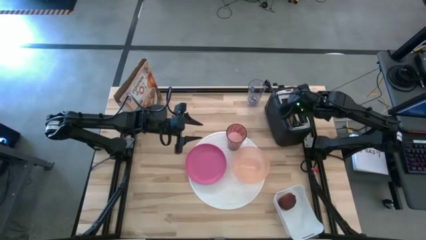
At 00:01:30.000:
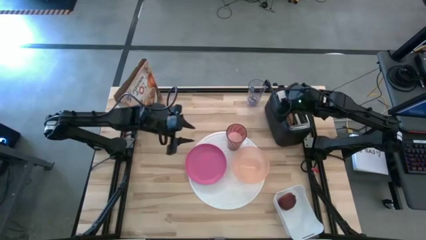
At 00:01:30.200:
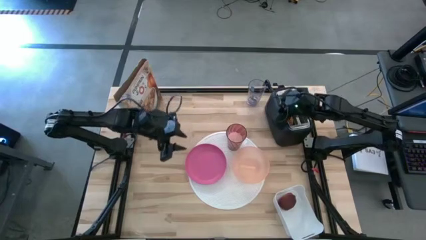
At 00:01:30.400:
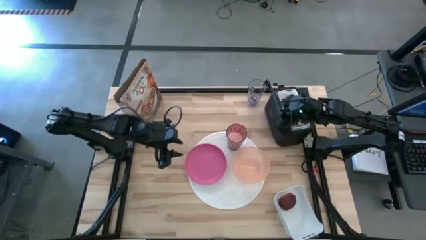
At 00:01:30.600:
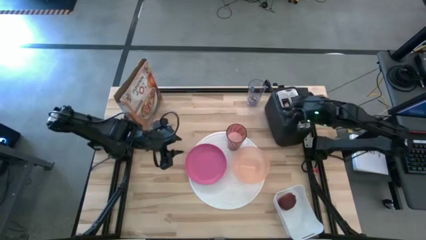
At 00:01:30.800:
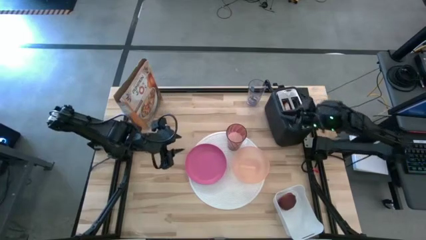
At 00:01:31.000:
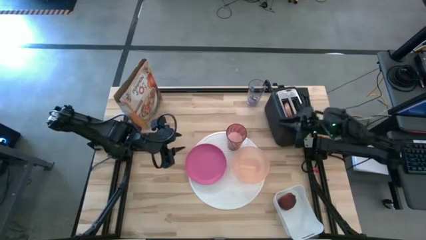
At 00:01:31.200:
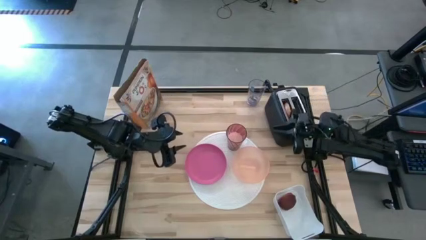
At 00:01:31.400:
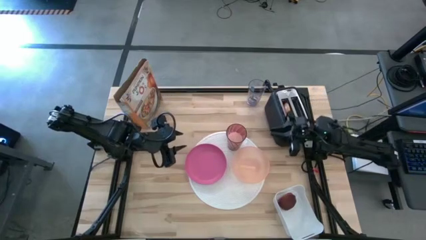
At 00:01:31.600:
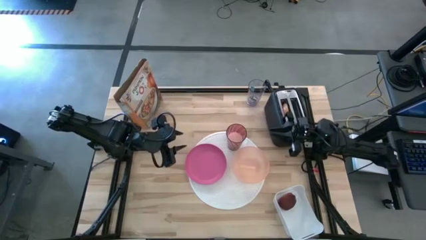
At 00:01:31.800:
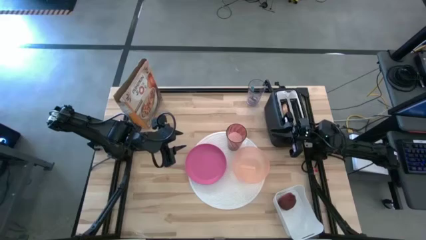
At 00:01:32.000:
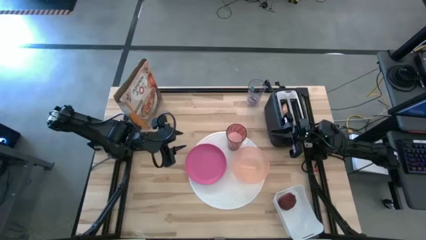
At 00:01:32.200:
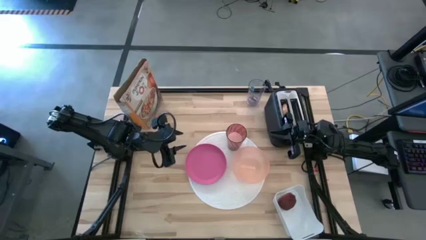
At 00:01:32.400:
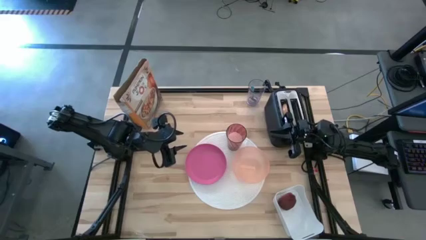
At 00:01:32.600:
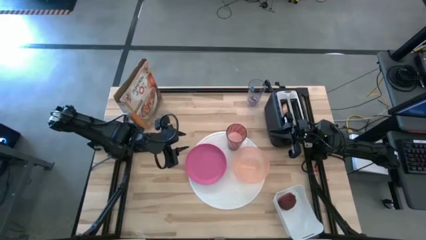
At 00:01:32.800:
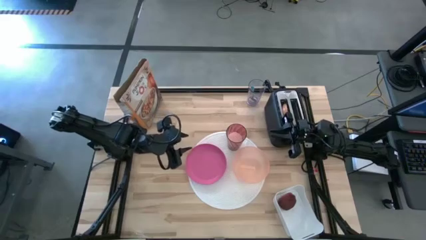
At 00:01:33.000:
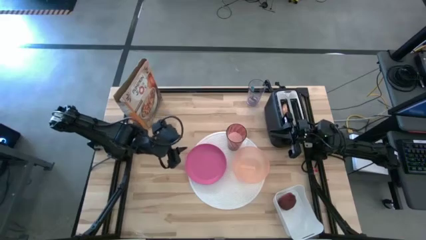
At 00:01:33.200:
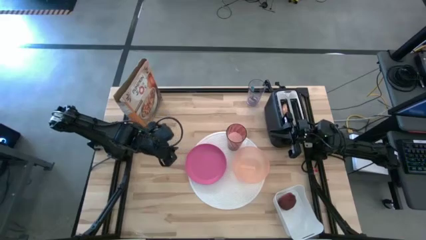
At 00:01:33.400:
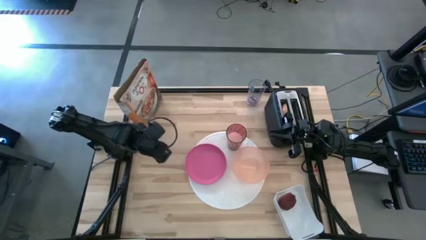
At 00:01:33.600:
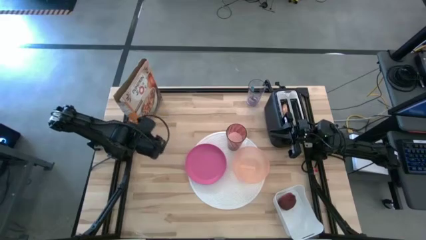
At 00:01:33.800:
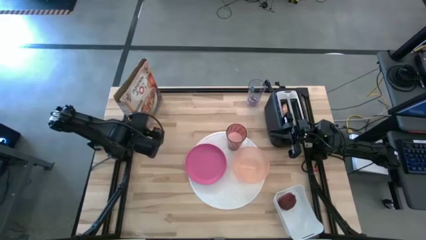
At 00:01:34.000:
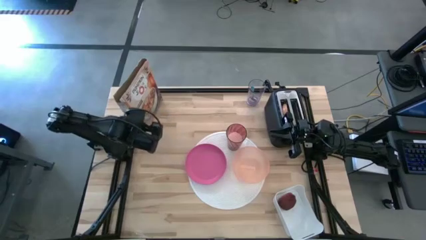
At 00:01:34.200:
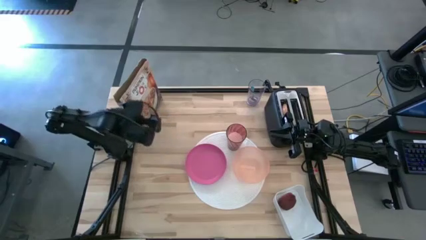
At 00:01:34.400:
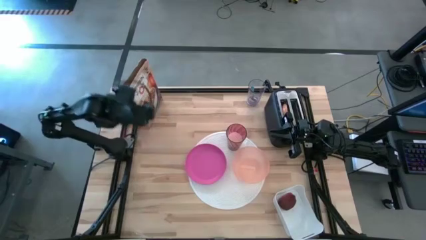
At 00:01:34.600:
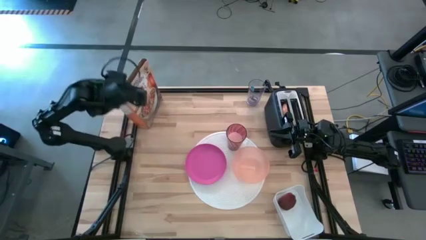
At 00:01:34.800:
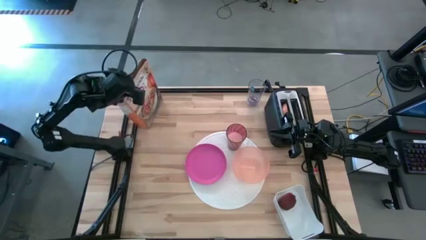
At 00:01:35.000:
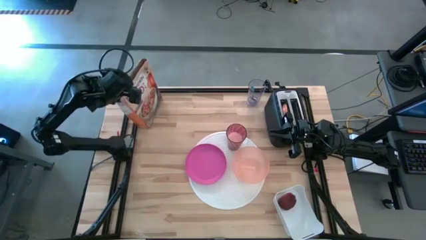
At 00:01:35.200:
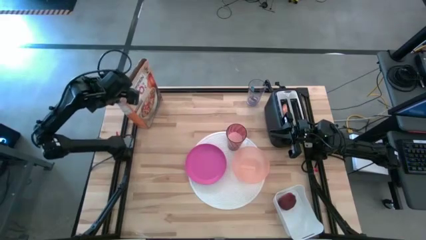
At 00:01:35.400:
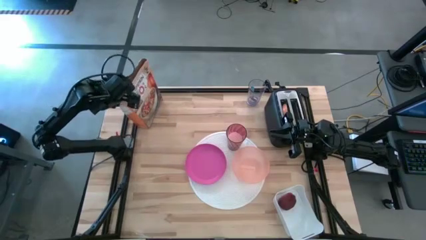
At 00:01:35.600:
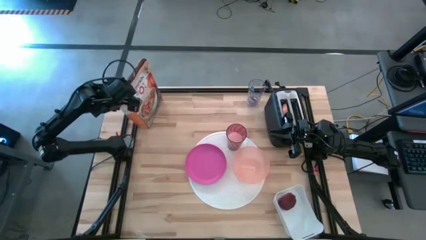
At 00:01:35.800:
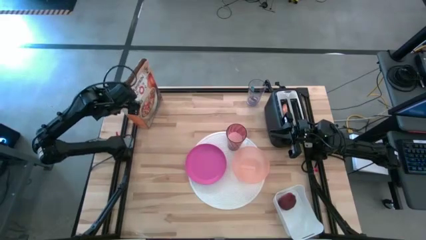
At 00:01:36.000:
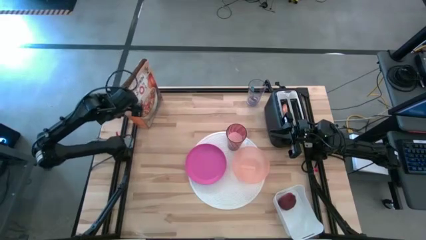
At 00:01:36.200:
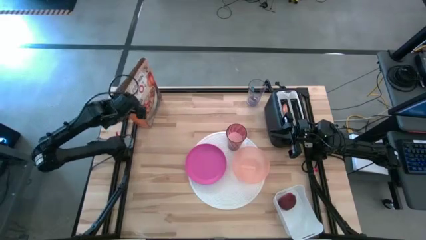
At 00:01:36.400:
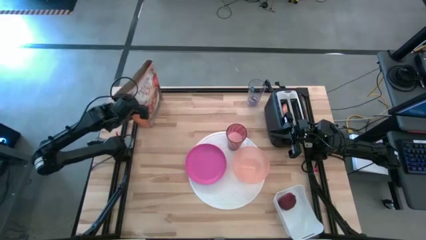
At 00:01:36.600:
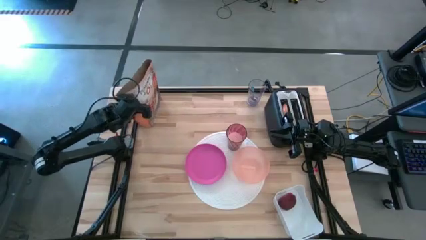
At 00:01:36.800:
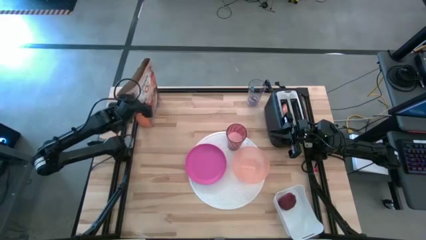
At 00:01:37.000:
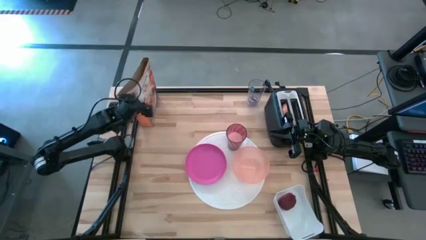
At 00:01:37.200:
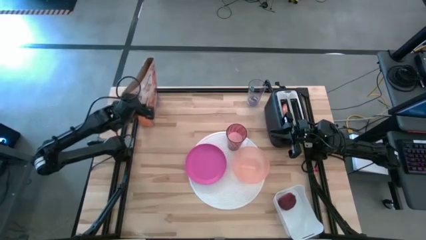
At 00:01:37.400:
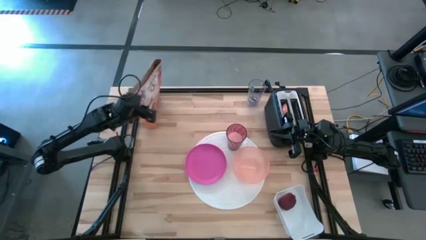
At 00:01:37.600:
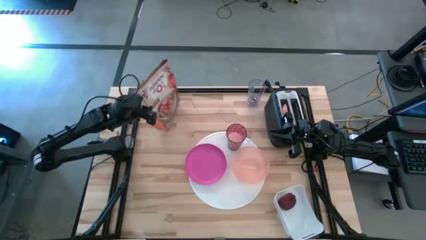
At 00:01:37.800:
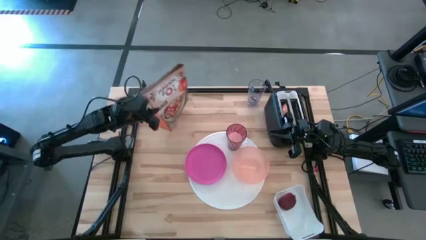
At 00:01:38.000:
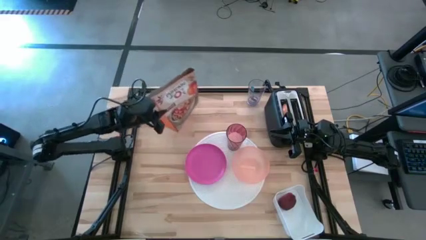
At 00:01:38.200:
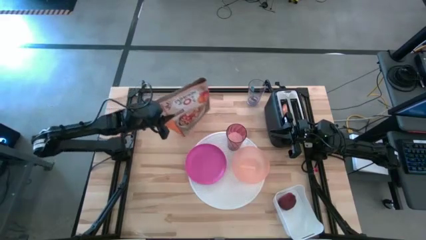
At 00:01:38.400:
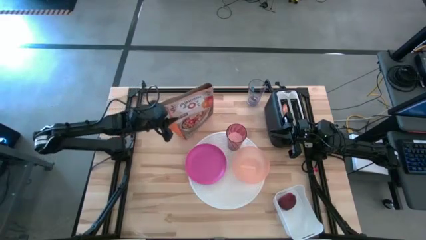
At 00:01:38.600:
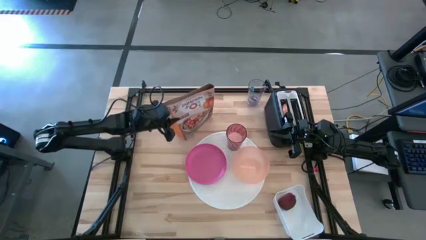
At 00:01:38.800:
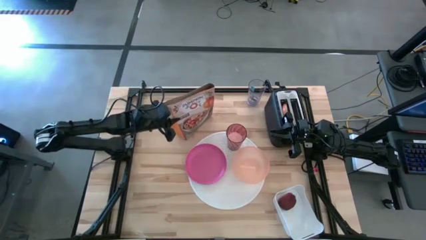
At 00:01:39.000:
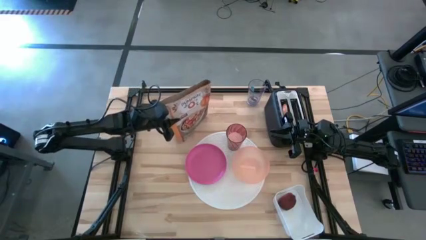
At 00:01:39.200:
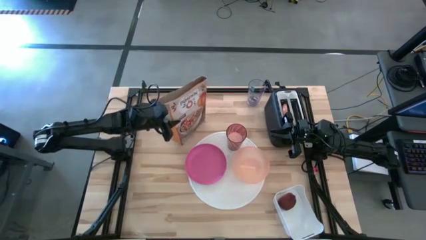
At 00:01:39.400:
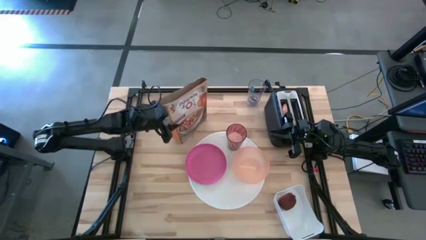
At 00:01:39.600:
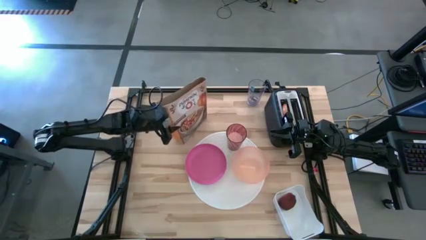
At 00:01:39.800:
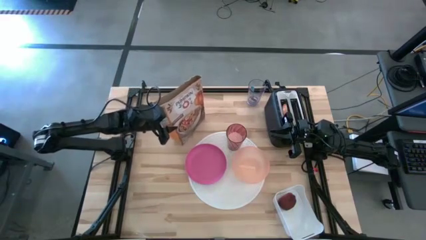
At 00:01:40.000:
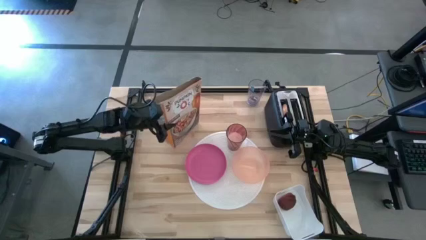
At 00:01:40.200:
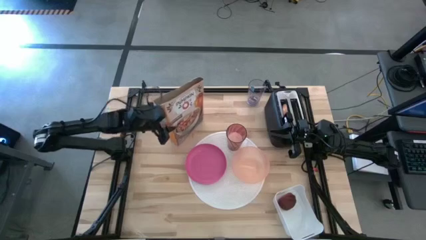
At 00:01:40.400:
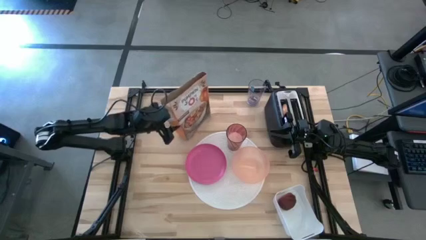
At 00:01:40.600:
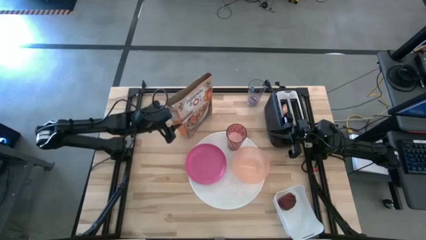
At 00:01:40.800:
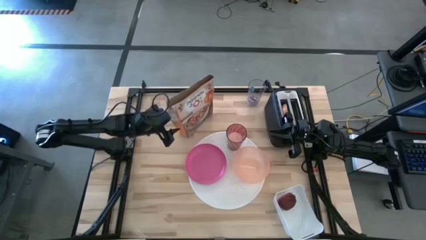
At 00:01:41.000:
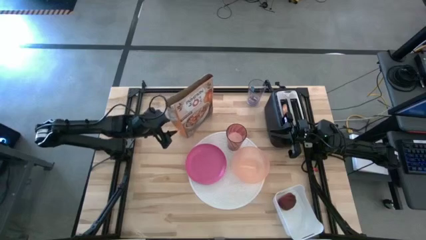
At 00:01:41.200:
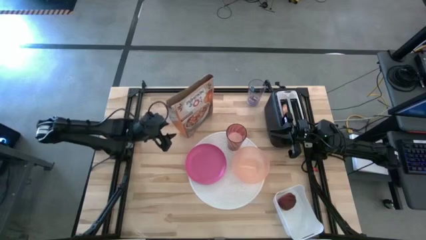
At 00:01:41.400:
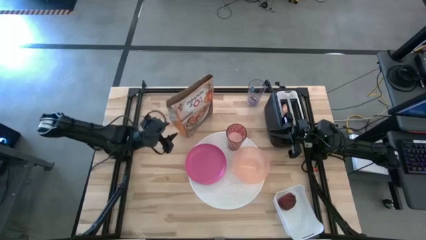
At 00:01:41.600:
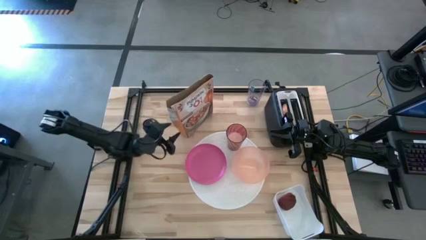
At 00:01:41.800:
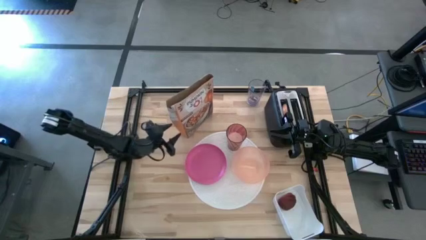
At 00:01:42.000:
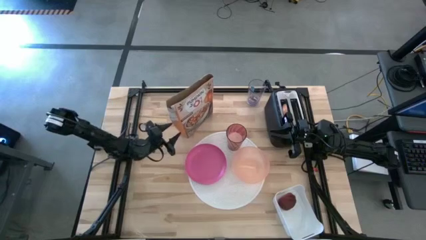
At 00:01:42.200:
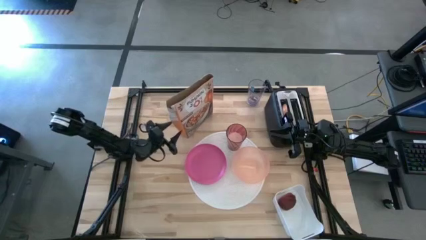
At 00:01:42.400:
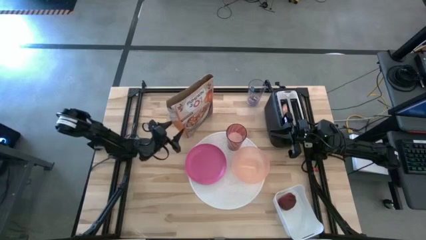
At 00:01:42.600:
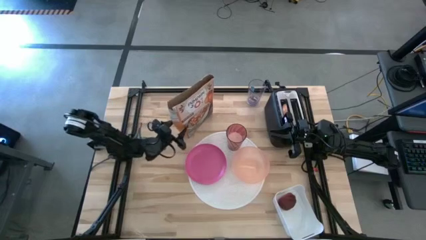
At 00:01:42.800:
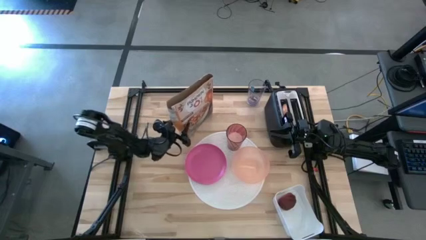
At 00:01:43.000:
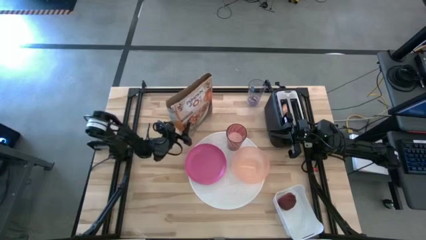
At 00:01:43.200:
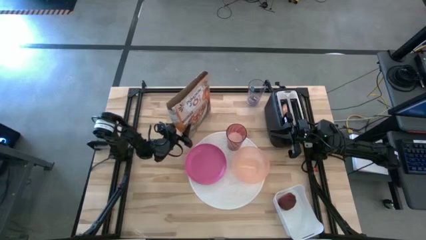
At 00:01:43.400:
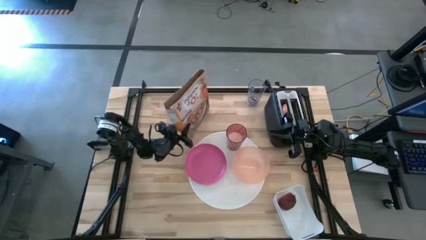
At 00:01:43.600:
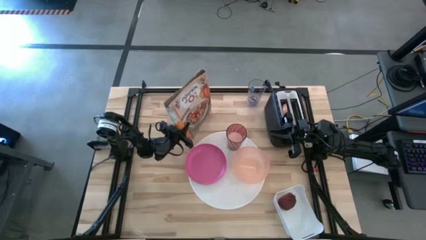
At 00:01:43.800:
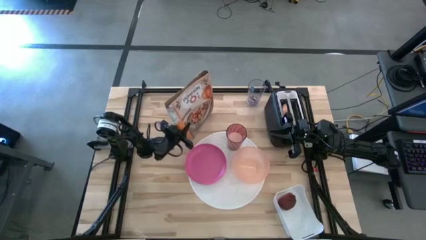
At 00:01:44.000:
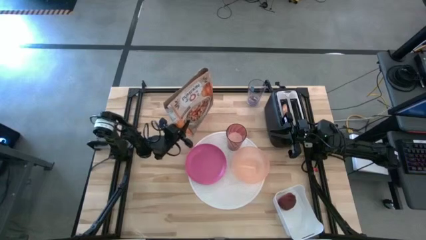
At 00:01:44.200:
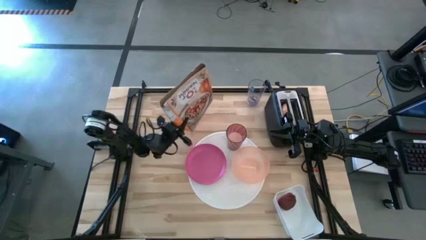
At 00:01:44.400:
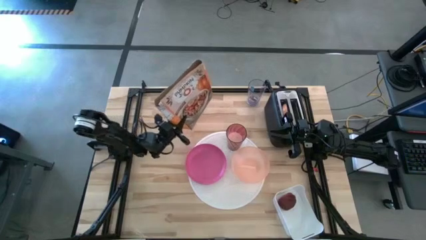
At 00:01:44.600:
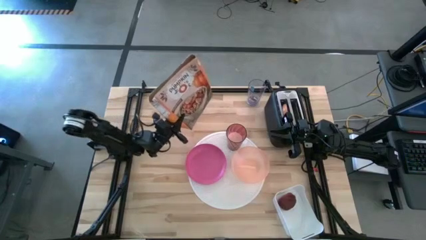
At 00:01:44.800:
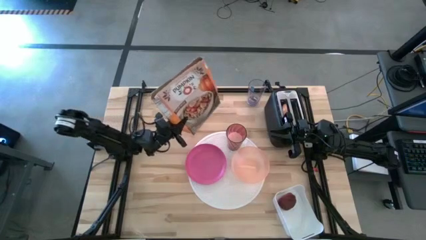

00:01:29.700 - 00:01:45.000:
Task: Arrange a breakfast setting
Pour the cereal into the orange bowl
